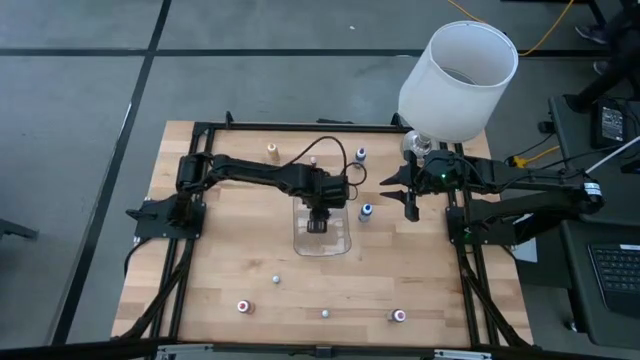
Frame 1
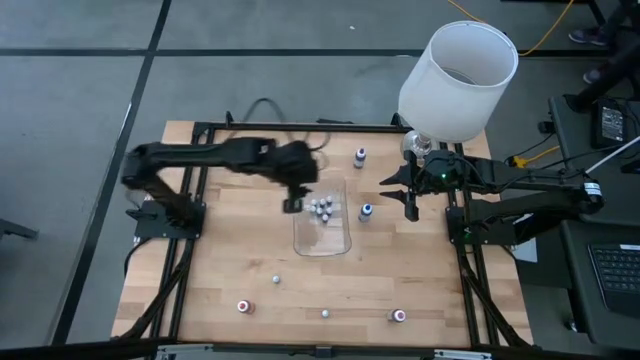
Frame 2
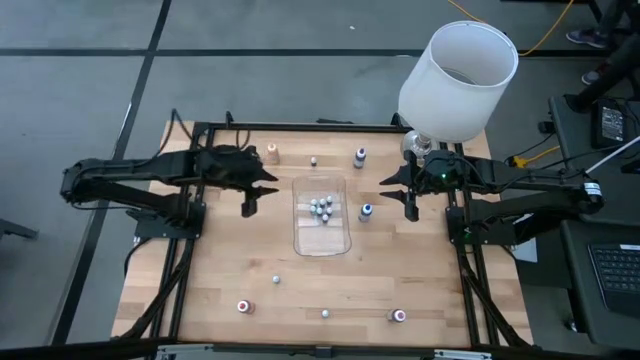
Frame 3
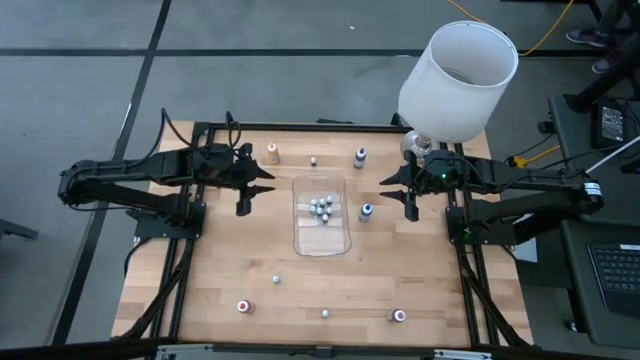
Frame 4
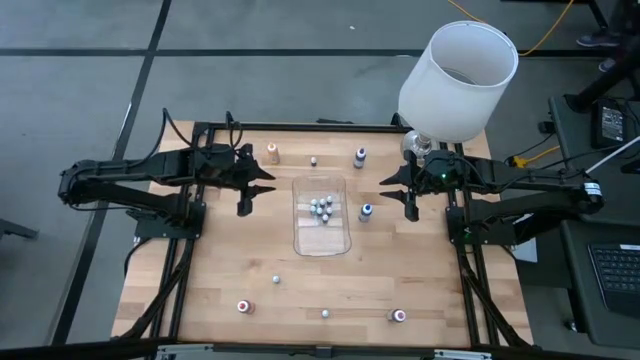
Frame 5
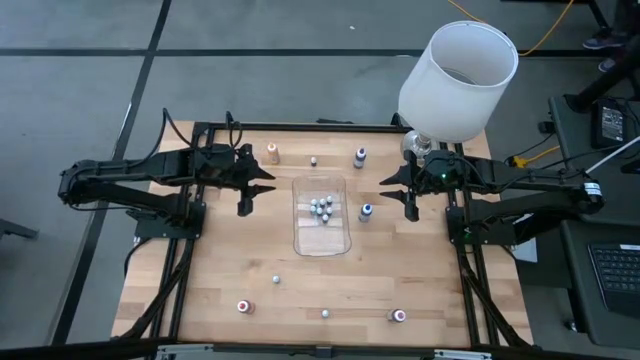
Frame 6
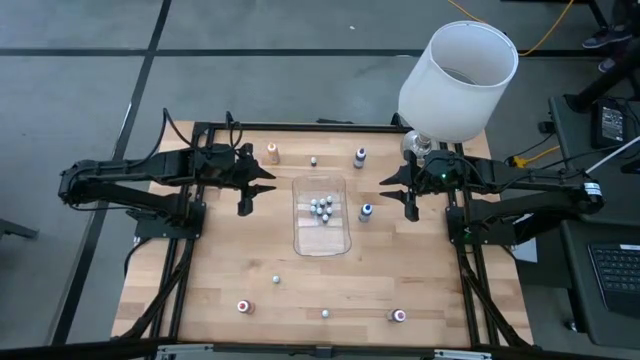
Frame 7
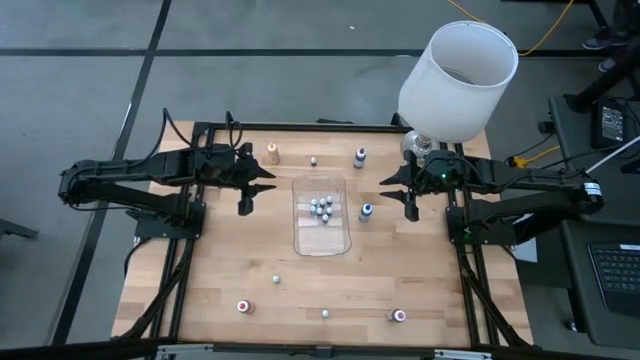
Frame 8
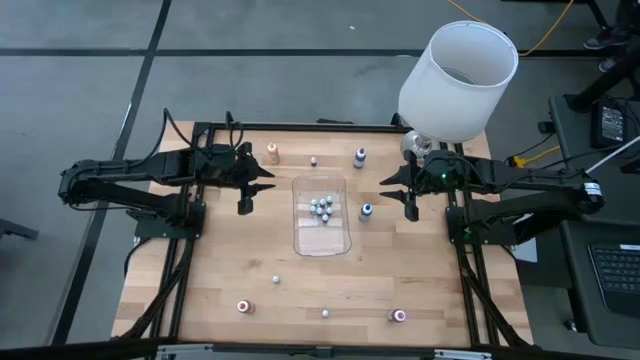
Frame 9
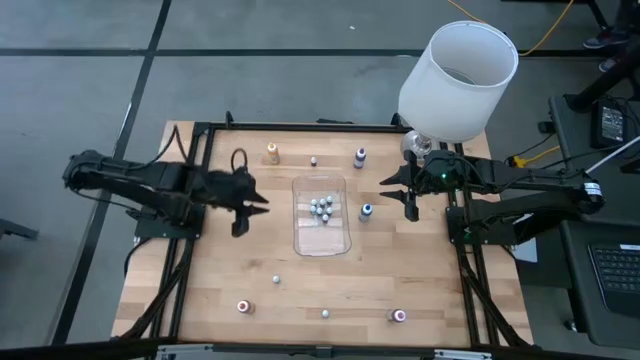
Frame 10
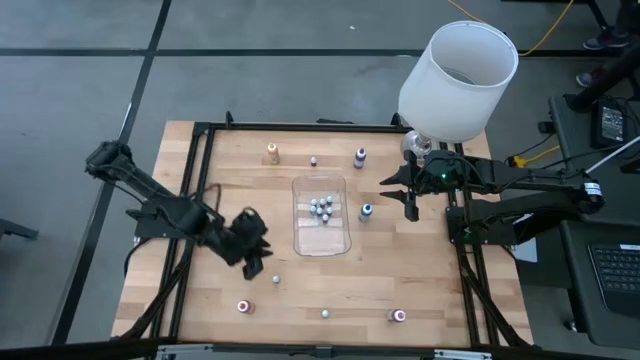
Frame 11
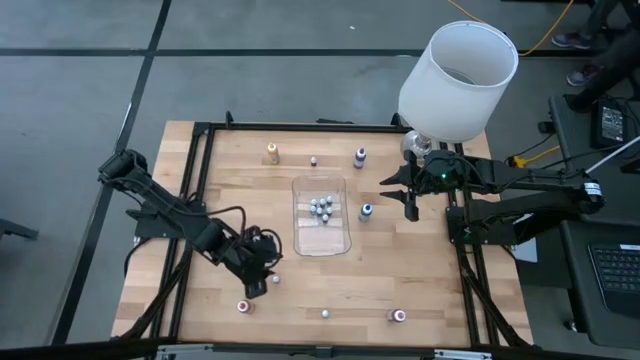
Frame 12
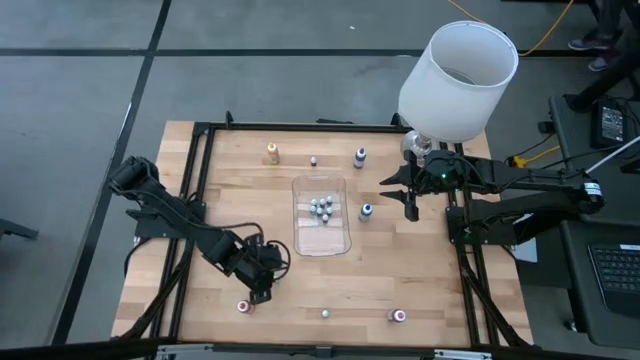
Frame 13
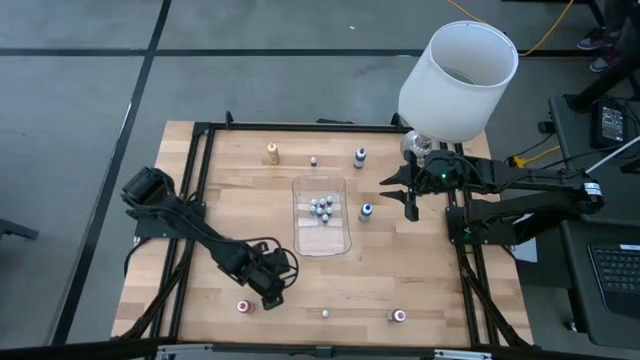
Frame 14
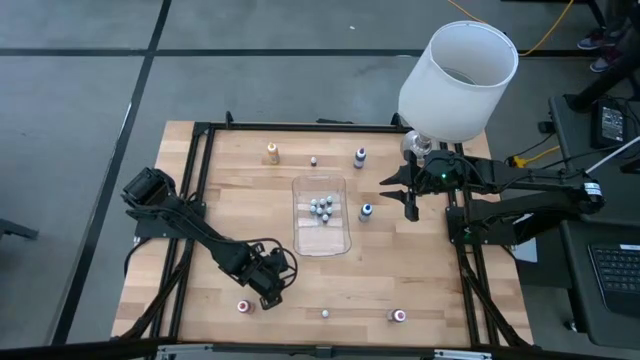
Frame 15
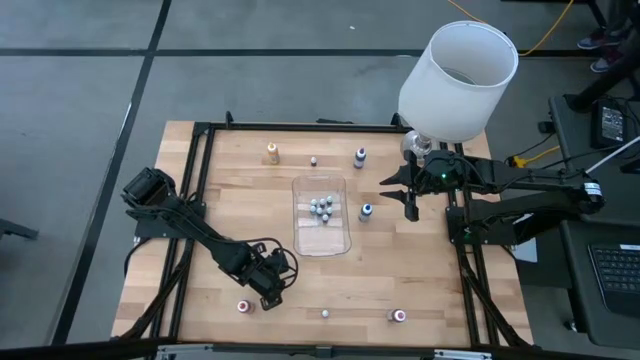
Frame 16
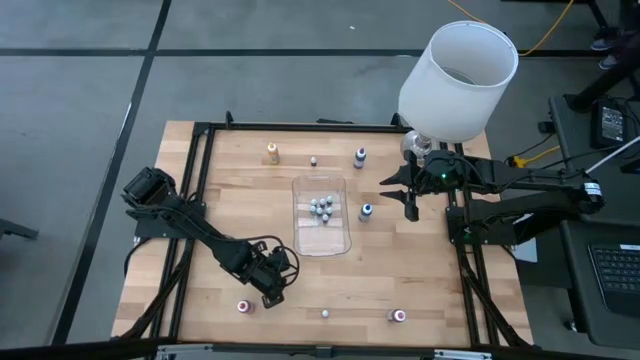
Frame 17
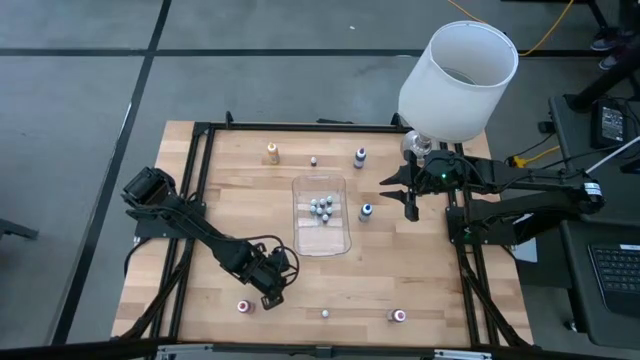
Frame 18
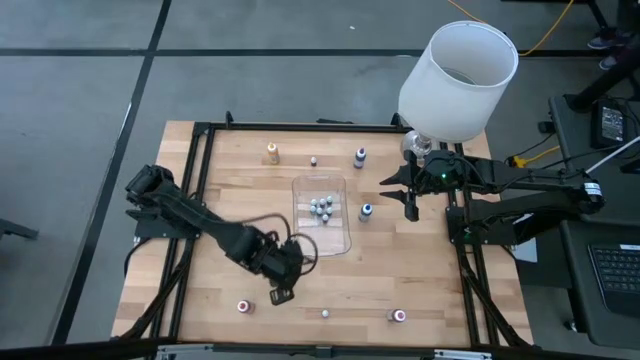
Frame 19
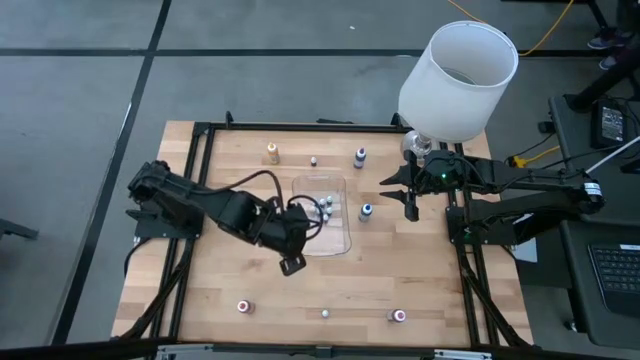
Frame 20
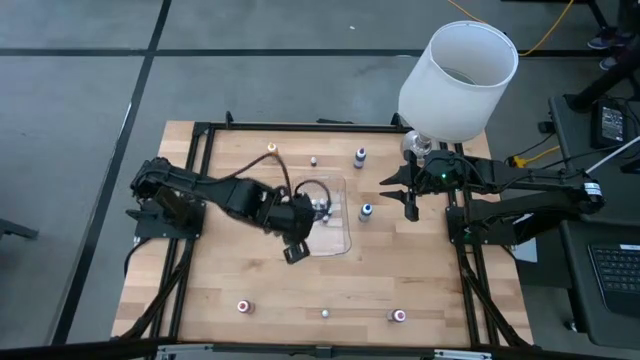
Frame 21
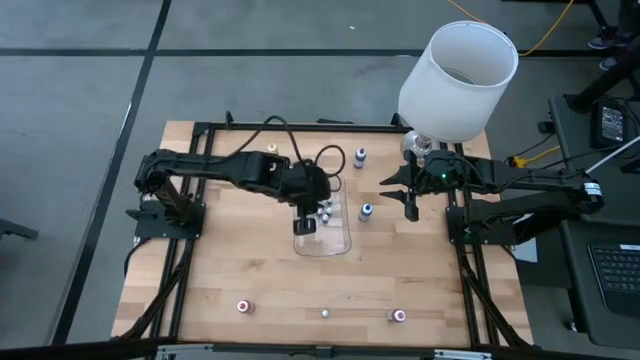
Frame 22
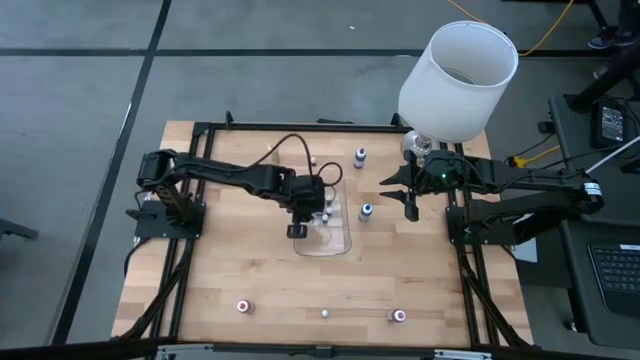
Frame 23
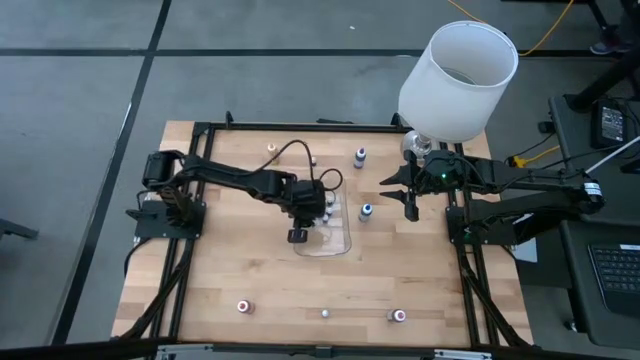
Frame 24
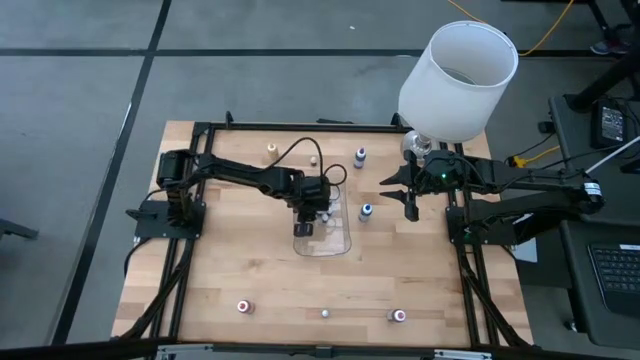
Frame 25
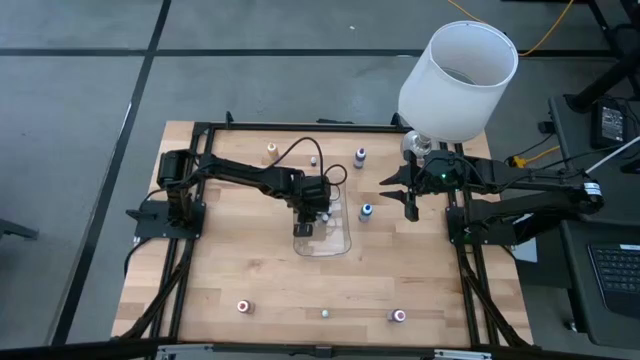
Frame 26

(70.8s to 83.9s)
Task: Pick & Place food coloring
Put the small blue food coloring into the transparent bin

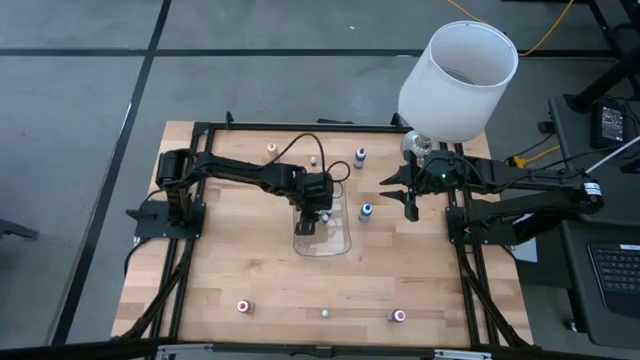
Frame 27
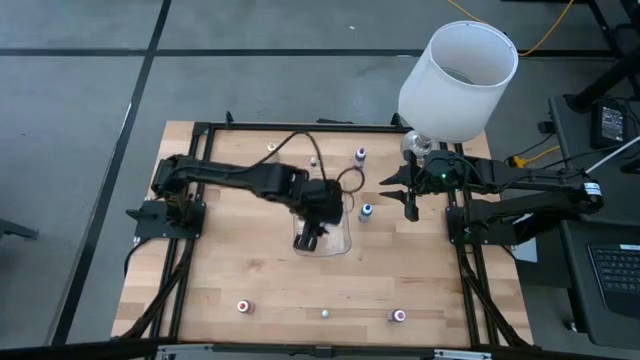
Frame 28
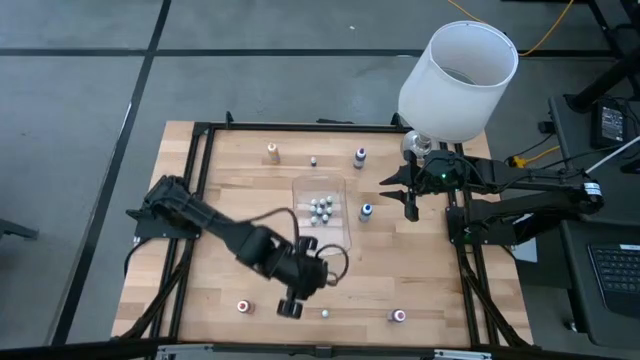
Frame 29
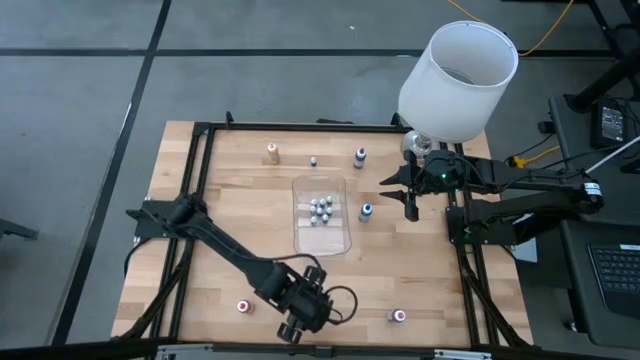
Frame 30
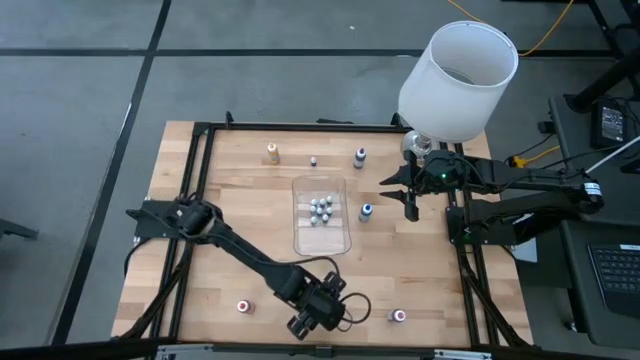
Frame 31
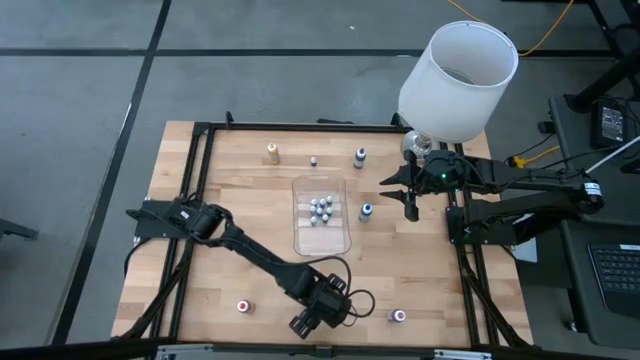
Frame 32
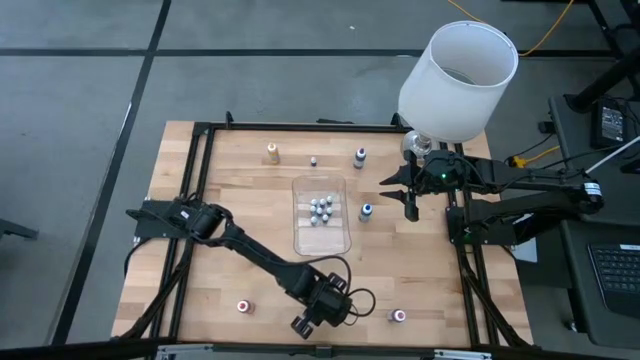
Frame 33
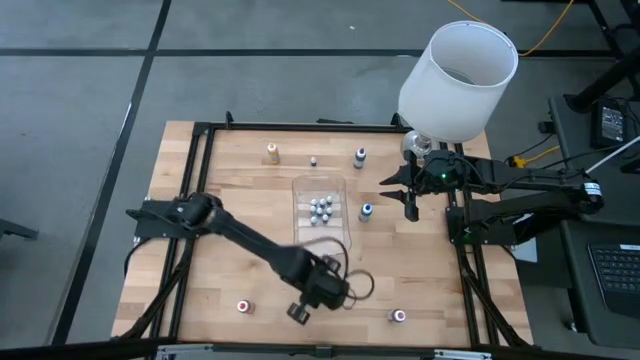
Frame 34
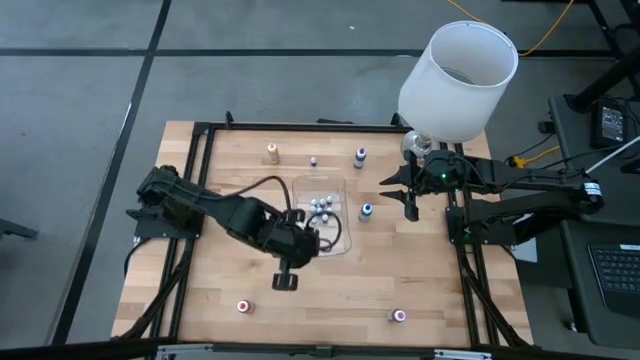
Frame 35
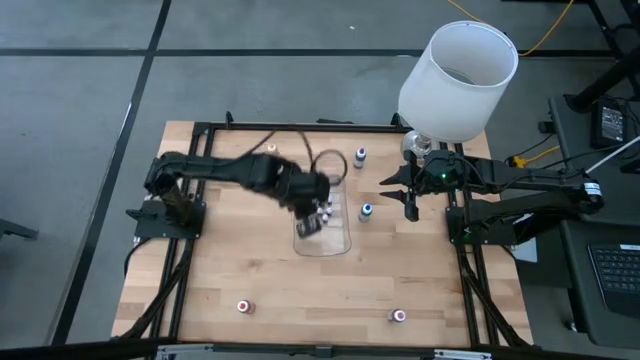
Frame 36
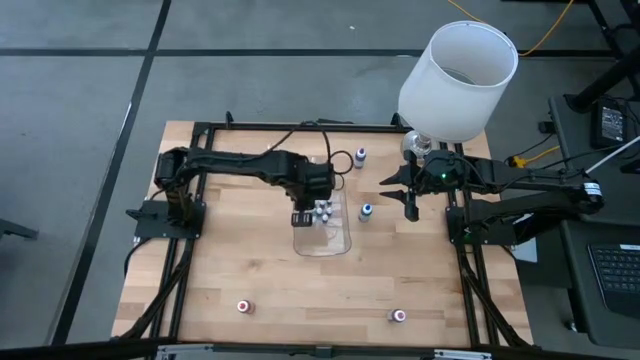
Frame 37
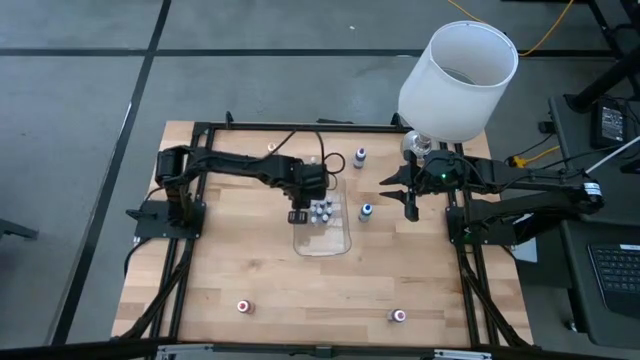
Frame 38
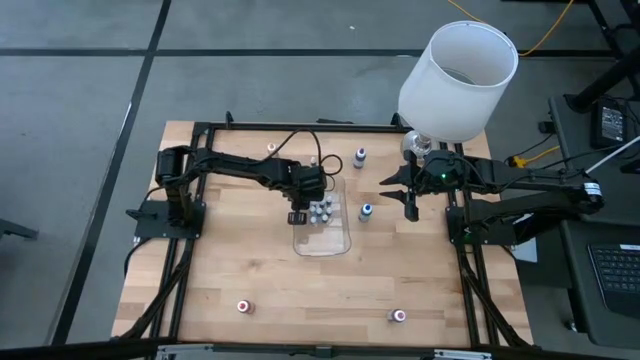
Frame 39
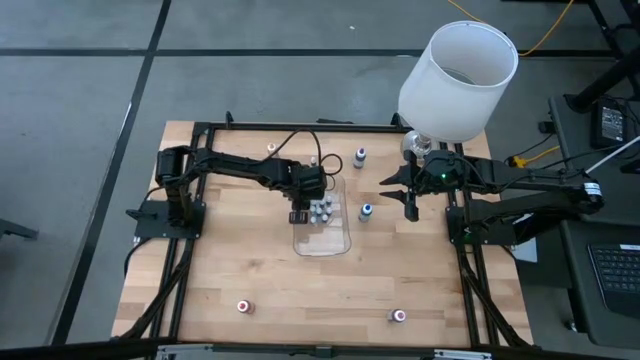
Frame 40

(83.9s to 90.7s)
Put the small red food coloring into the transparent bin

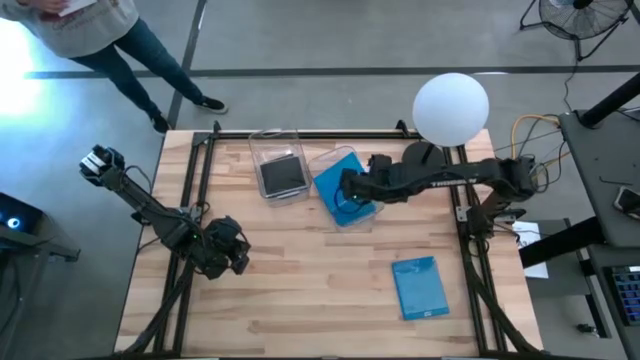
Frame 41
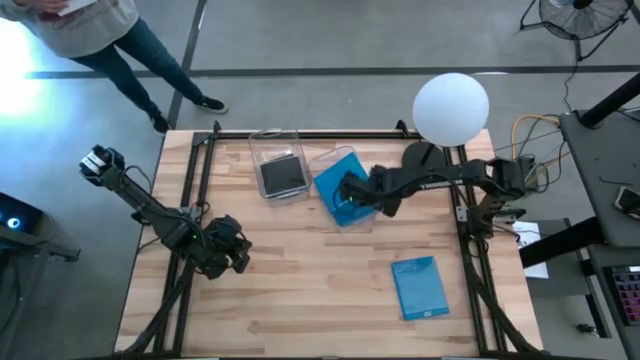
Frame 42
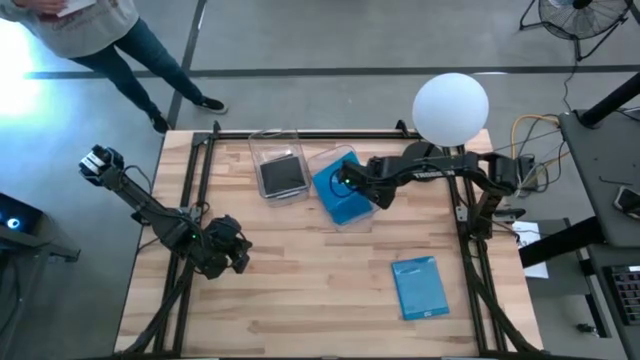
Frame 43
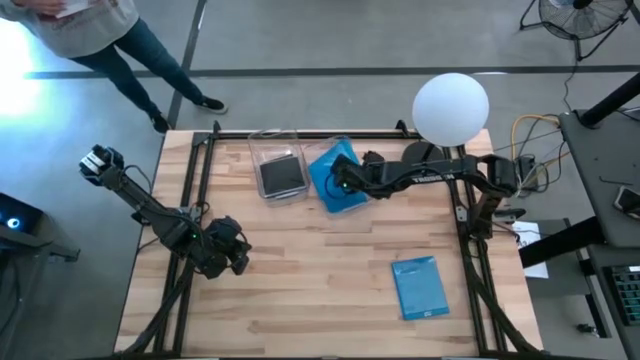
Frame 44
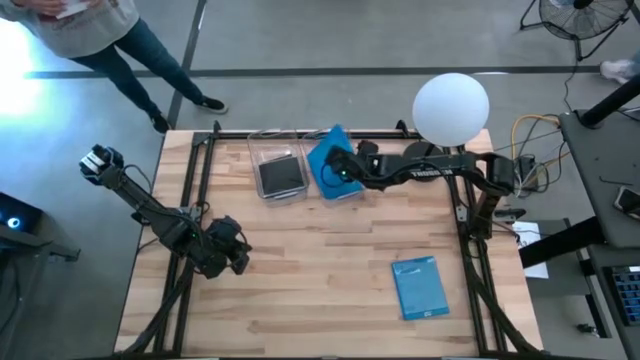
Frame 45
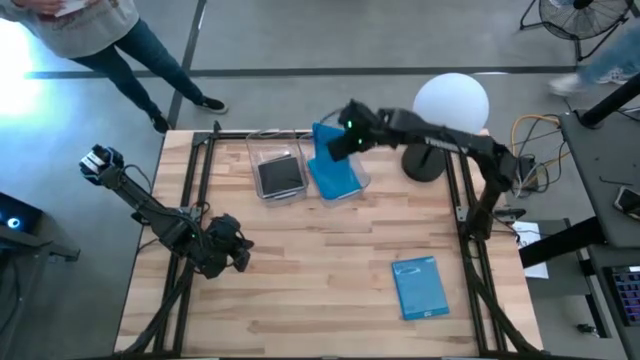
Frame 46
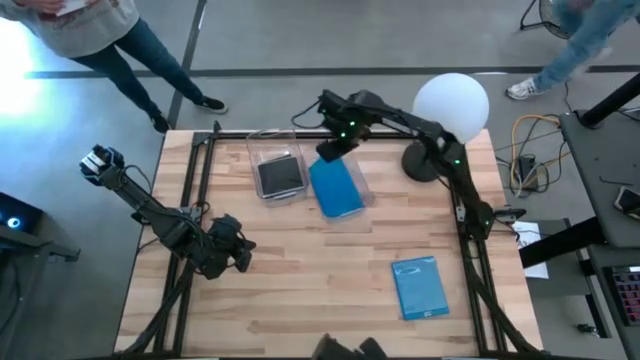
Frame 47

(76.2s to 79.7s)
Task: Pick & place jewel cases by type
Put the left blue CD case into the right transparent bin
